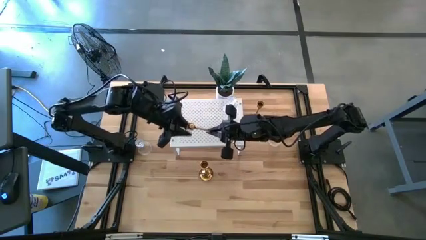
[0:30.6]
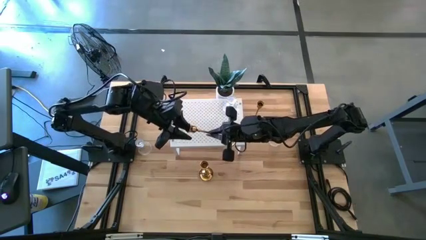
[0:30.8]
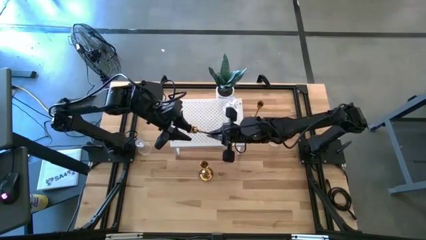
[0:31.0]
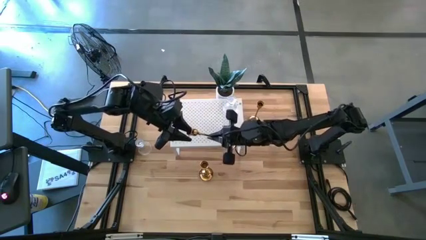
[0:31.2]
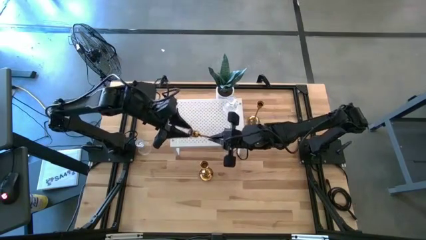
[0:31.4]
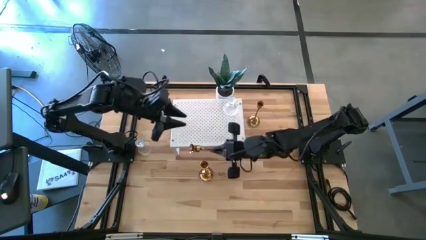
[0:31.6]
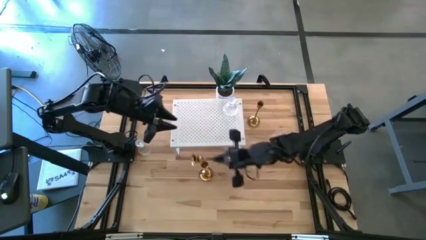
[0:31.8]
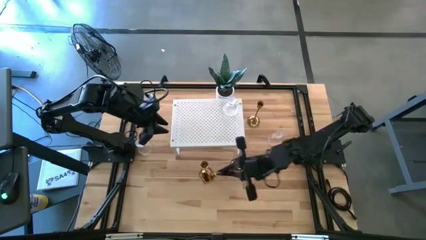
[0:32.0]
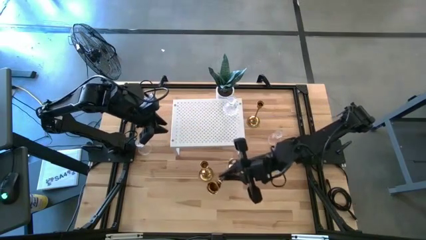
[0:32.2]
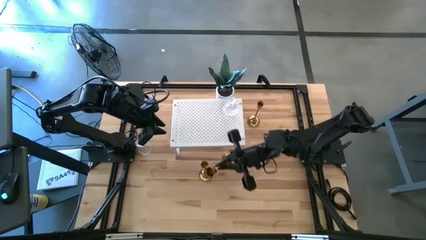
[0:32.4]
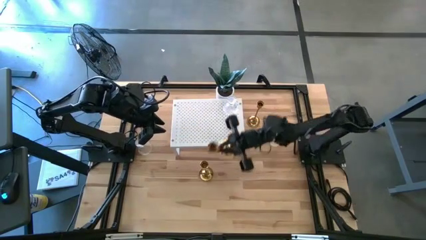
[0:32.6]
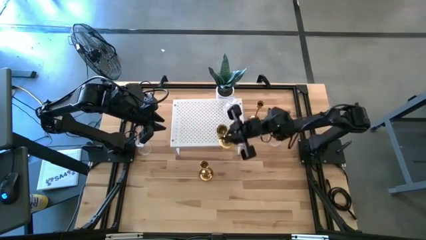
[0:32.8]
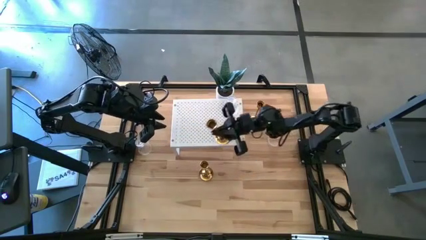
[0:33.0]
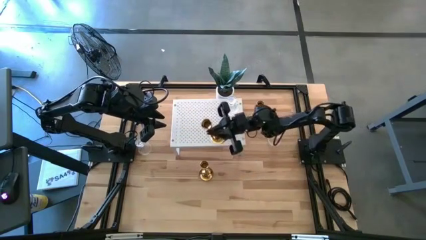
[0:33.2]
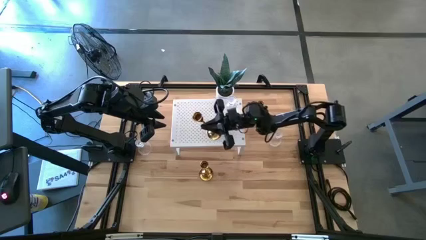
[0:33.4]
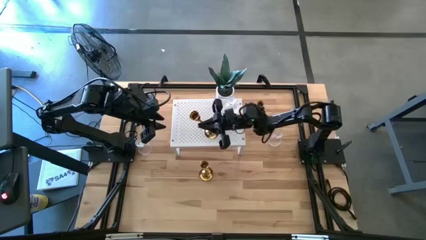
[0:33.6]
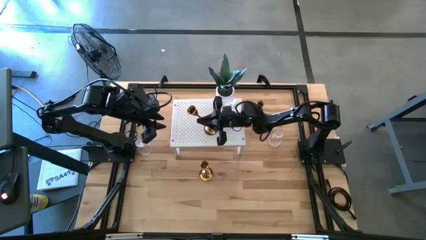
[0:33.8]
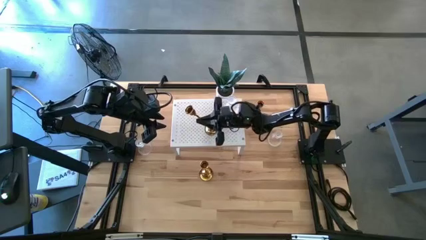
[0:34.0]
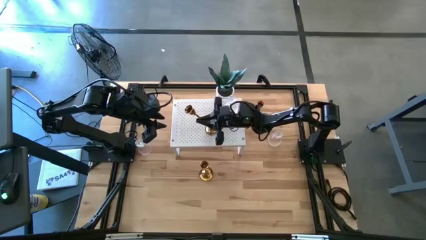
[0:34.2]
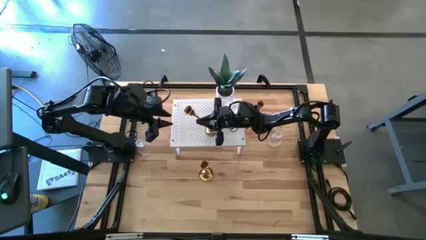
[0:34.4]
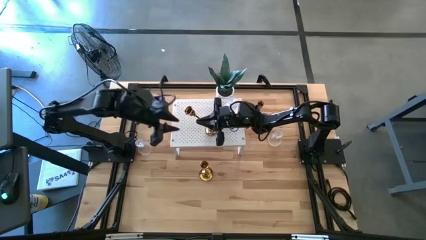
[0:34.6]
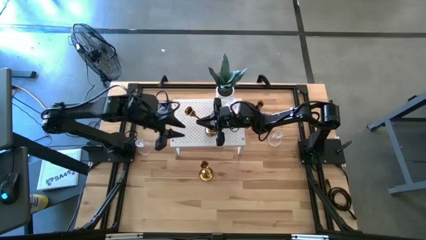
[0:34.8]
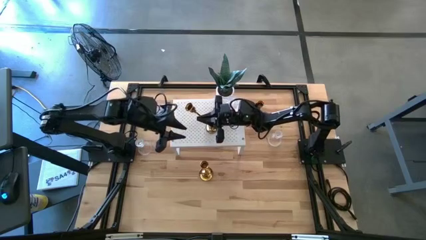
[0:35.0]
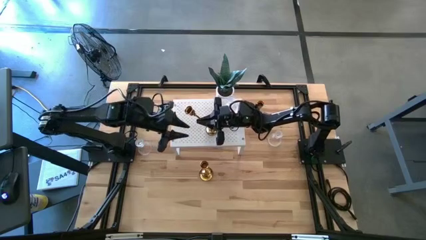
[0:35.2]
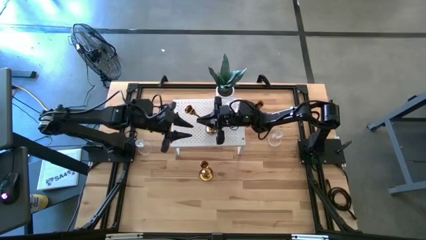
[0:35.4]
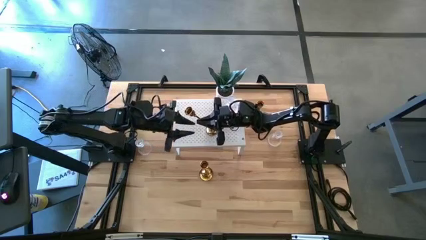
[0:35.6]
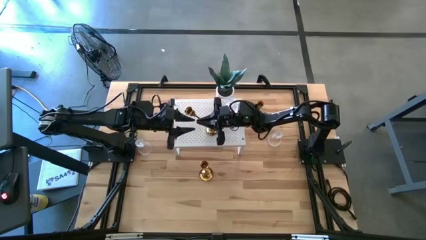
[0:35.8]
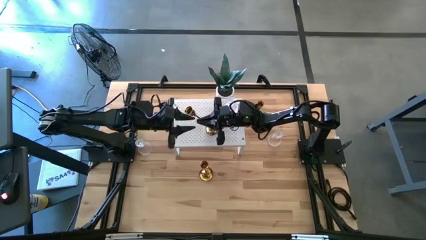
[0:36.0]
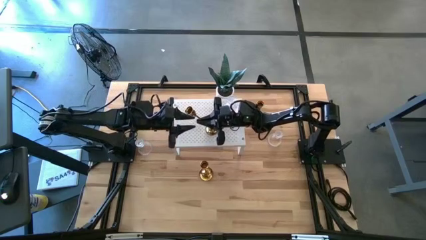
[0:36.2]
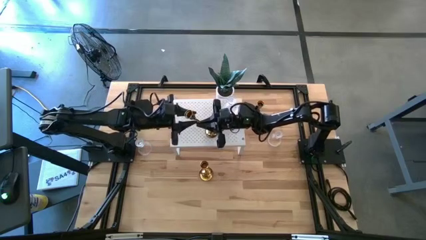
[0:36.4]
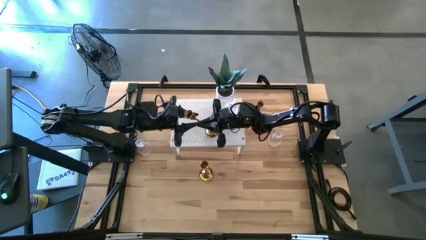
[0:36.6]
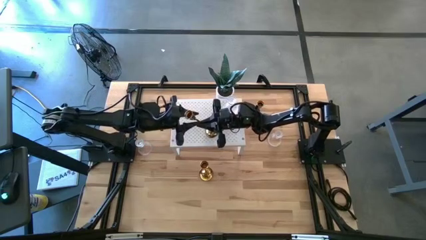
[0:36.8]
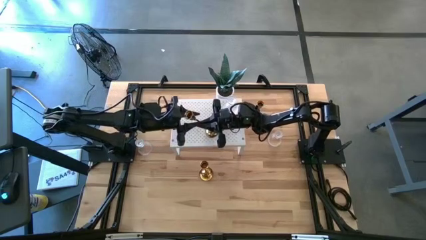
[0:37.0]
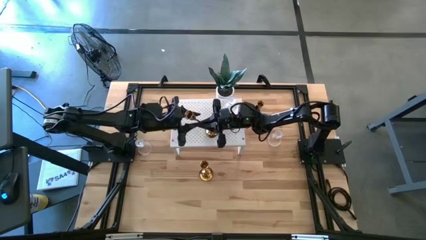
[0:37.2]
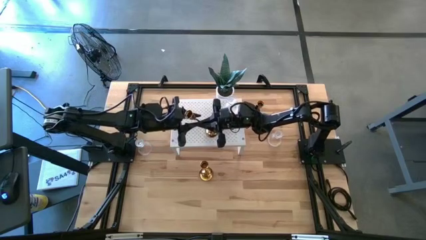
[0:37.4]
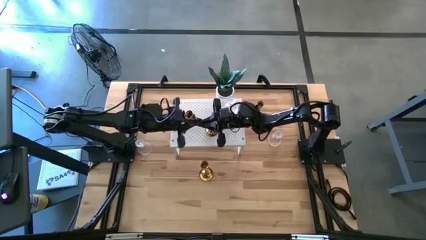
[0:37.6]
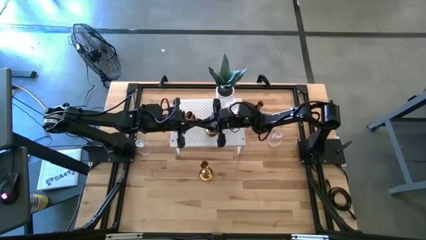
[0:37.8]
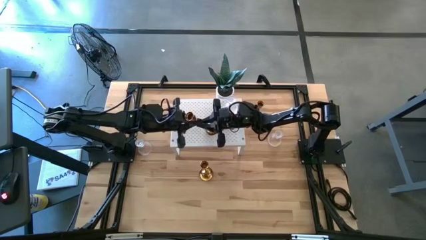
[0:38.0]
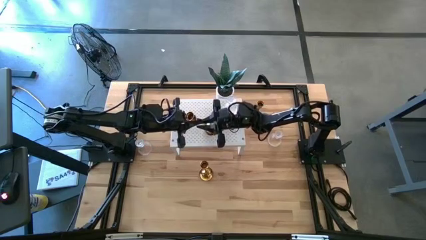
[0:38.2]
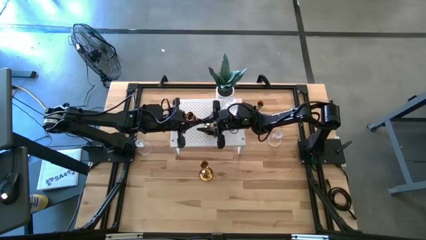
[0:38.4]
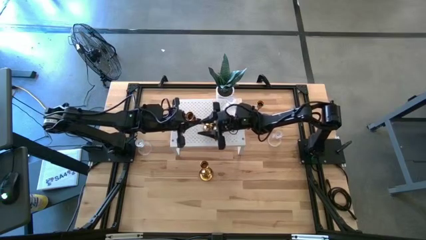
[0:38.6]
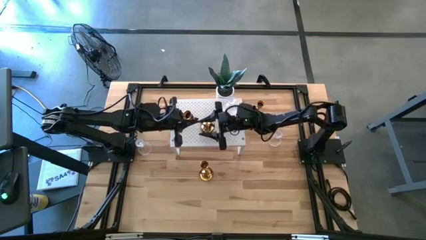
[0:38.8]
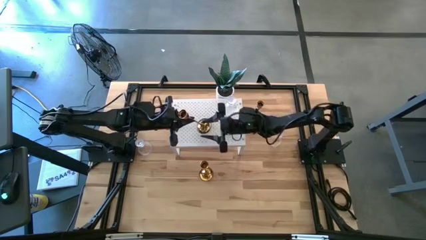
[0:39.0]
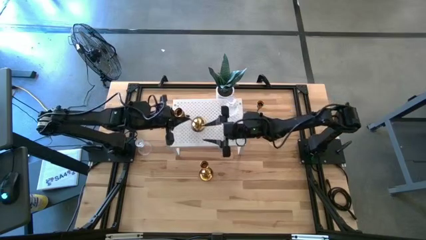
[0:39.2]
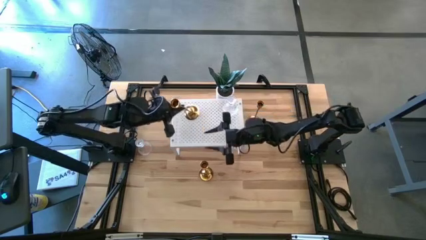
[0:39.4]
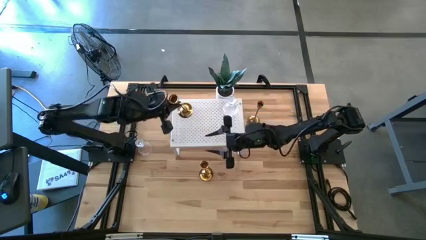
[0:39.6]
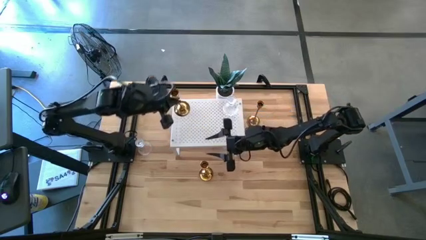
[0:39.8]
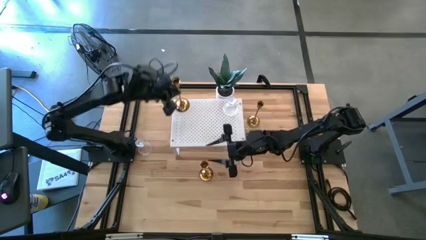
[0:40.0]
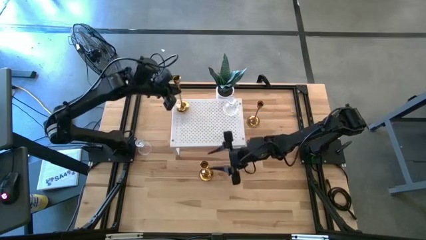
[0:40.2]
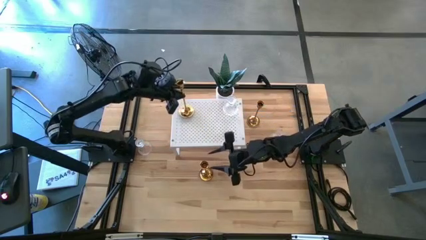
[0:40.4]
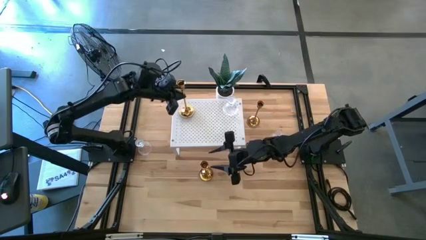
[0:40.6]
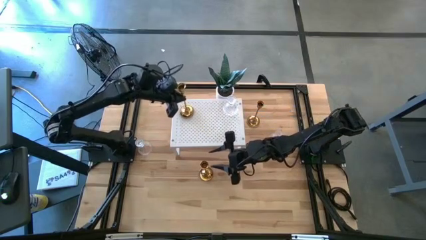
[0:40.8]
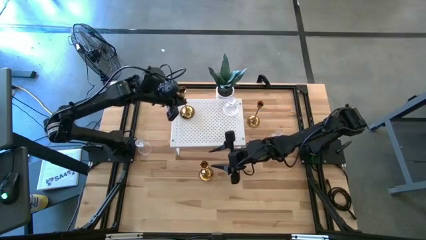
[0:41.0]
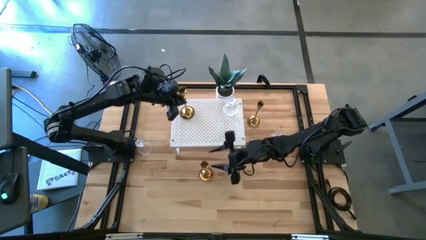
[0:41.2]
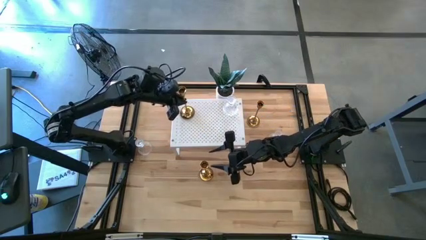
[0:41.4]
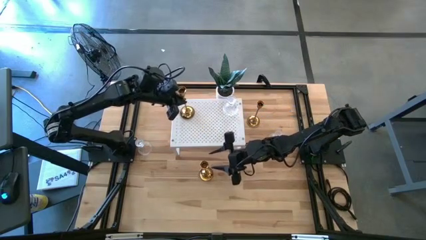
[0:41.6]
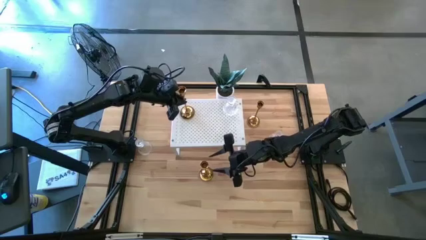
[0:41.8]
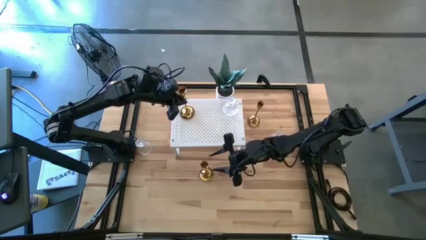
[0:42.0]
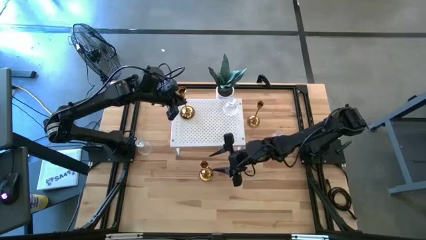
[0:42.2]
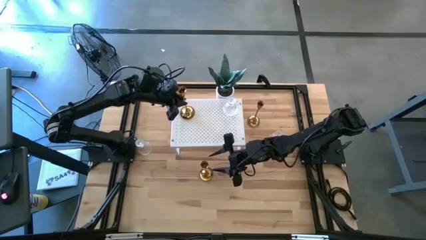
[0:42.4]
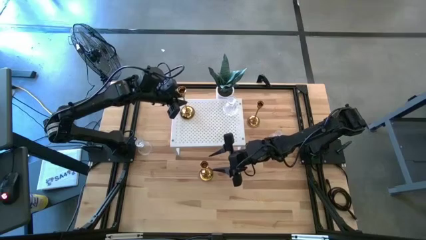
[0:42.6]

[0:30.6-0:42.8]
Task: Pick & Place candle stick holders
Put the top left gold candle holder on the shelf
